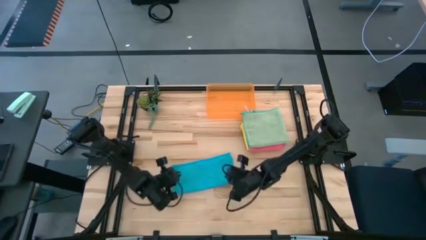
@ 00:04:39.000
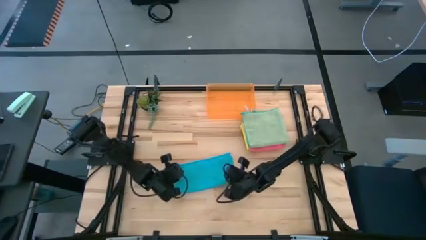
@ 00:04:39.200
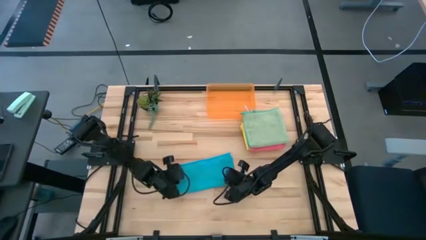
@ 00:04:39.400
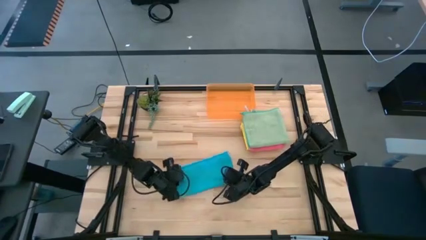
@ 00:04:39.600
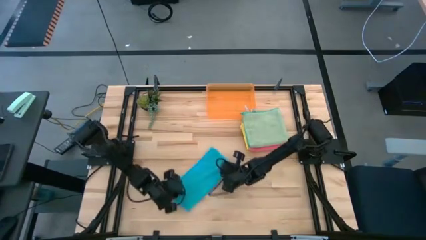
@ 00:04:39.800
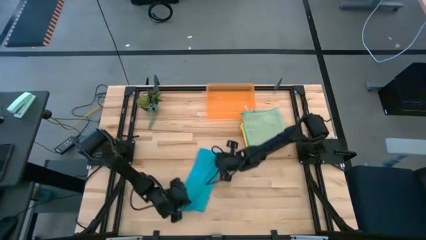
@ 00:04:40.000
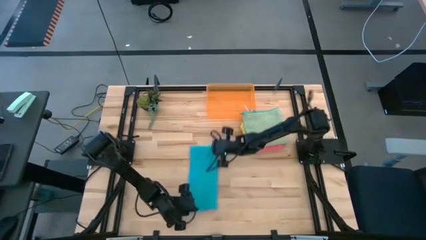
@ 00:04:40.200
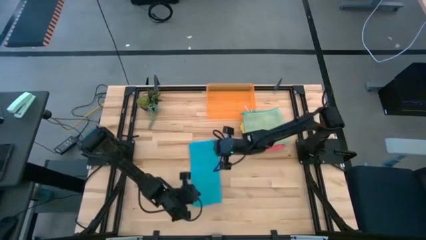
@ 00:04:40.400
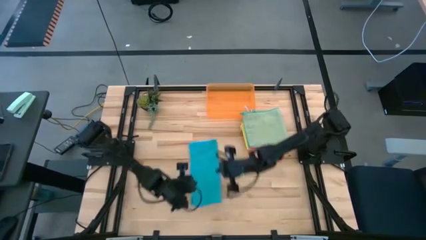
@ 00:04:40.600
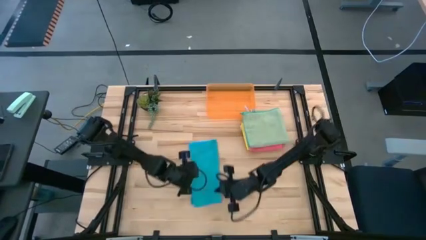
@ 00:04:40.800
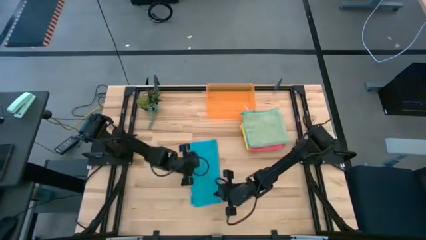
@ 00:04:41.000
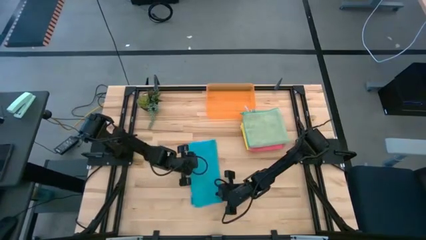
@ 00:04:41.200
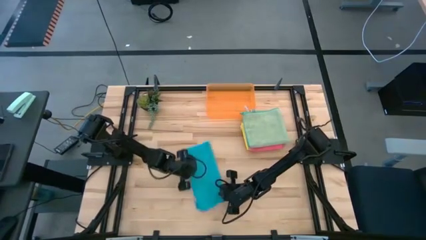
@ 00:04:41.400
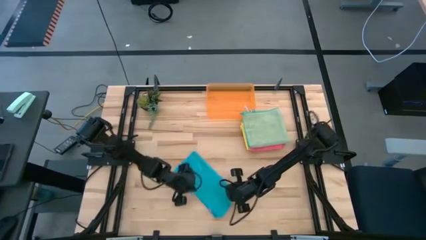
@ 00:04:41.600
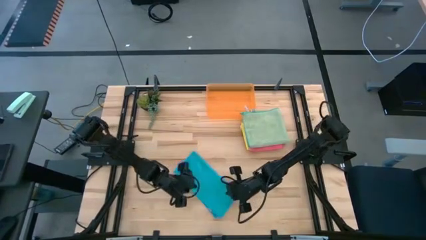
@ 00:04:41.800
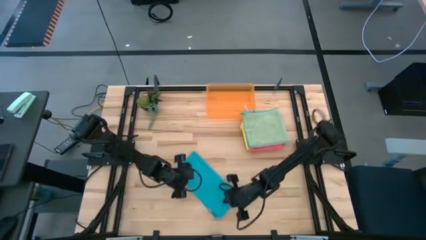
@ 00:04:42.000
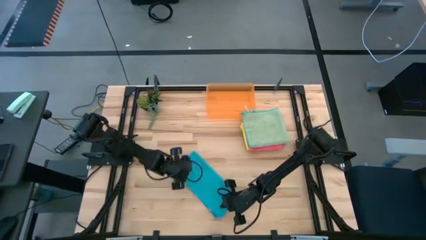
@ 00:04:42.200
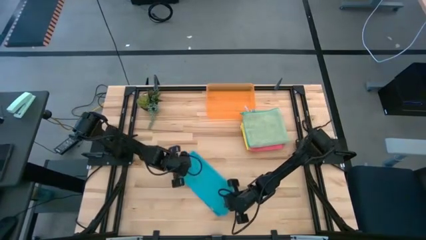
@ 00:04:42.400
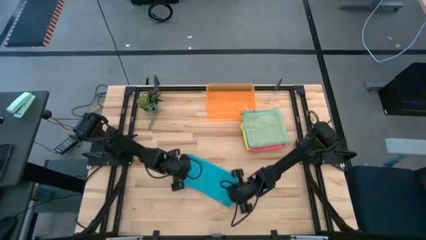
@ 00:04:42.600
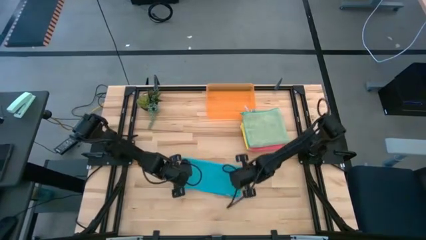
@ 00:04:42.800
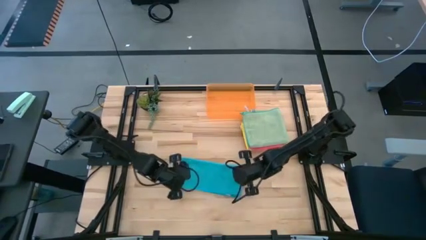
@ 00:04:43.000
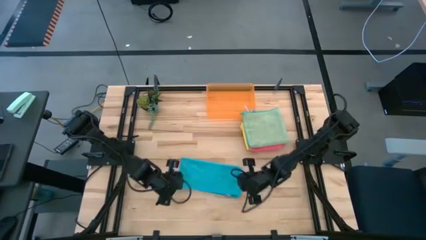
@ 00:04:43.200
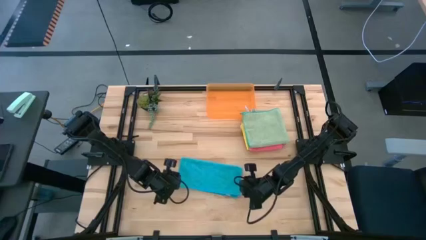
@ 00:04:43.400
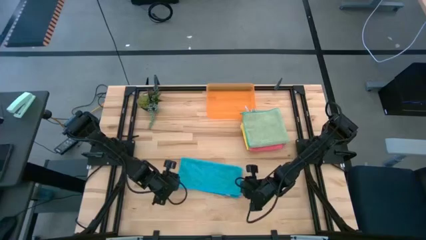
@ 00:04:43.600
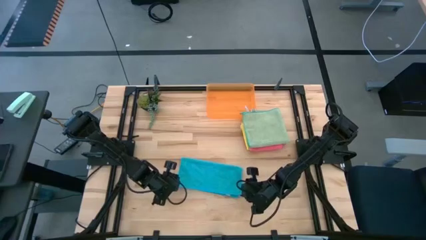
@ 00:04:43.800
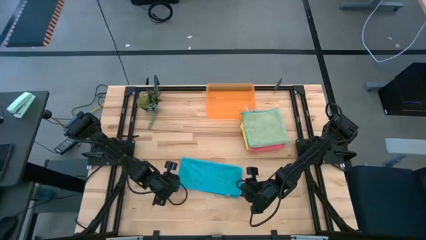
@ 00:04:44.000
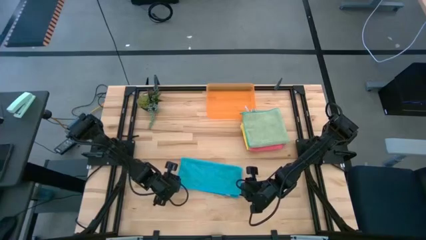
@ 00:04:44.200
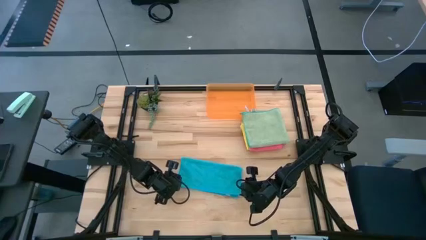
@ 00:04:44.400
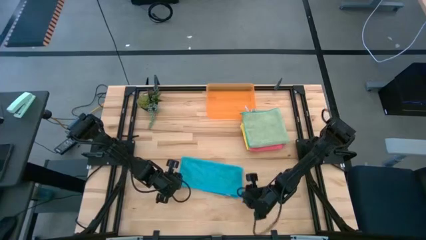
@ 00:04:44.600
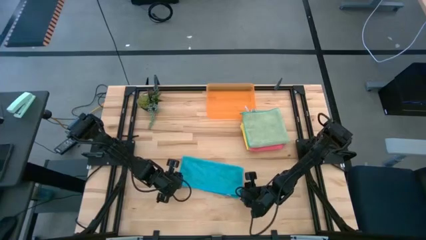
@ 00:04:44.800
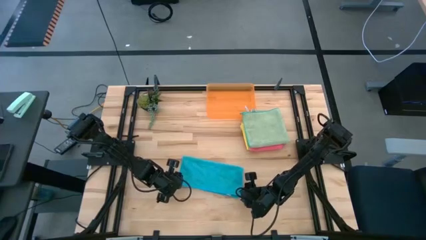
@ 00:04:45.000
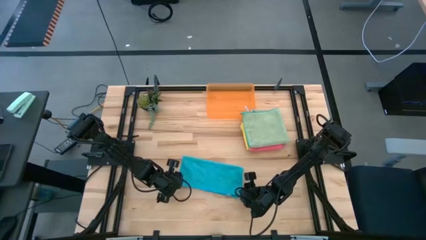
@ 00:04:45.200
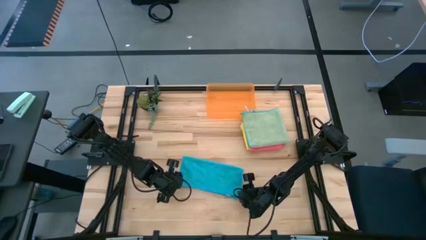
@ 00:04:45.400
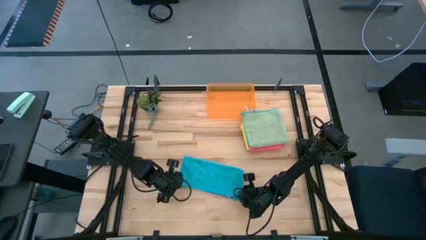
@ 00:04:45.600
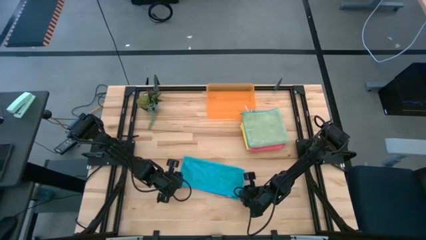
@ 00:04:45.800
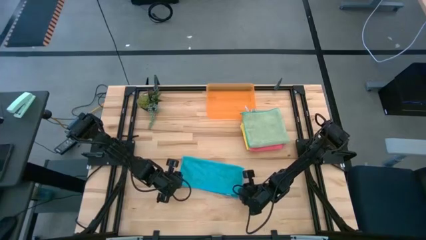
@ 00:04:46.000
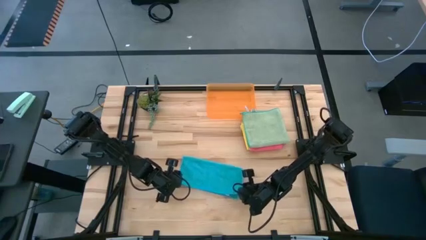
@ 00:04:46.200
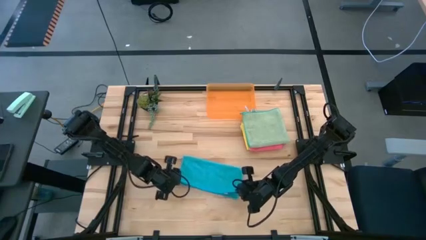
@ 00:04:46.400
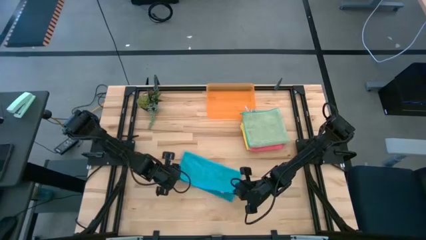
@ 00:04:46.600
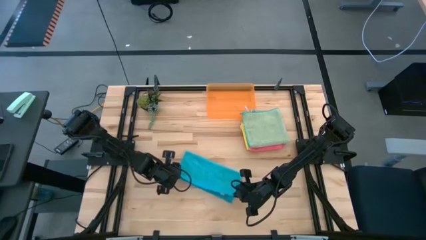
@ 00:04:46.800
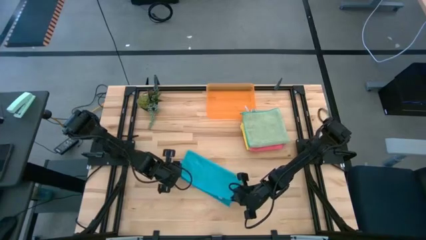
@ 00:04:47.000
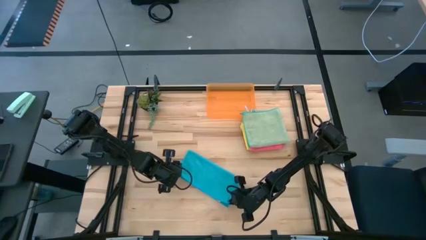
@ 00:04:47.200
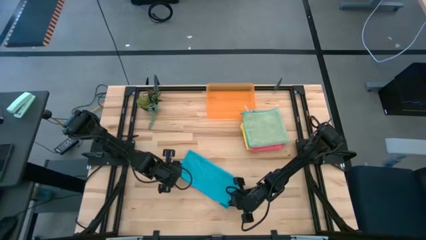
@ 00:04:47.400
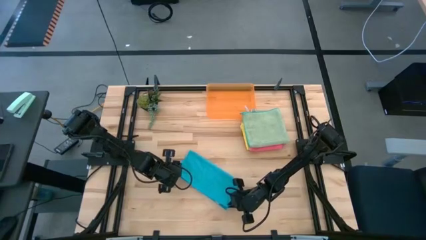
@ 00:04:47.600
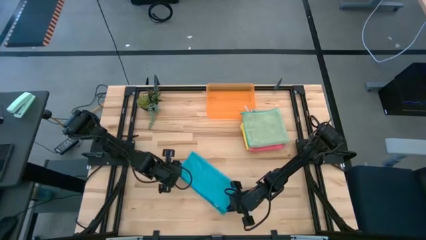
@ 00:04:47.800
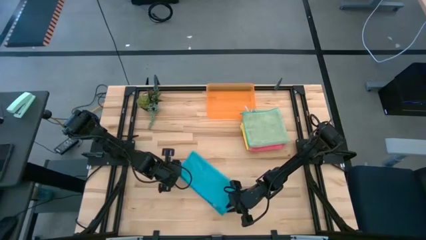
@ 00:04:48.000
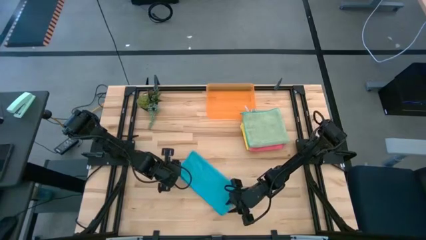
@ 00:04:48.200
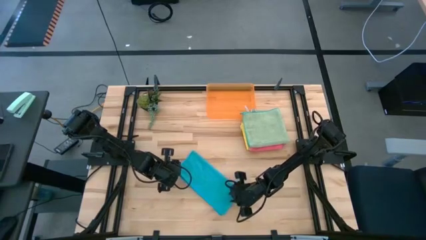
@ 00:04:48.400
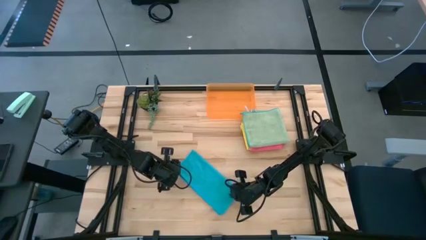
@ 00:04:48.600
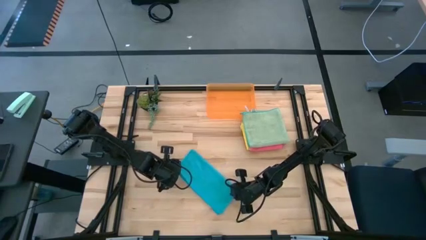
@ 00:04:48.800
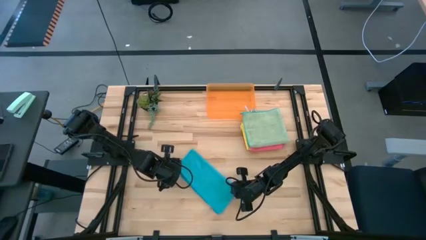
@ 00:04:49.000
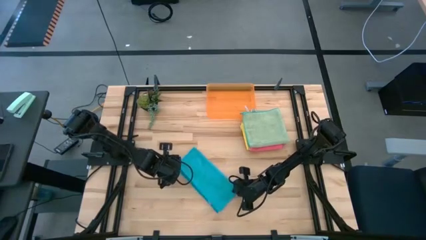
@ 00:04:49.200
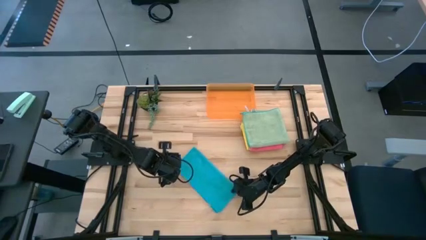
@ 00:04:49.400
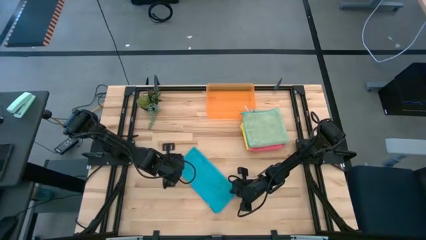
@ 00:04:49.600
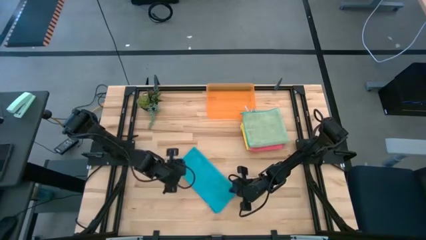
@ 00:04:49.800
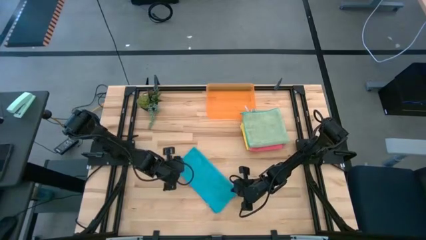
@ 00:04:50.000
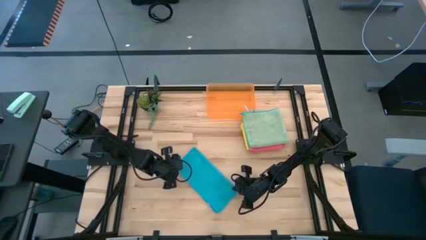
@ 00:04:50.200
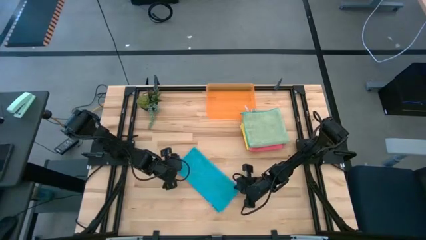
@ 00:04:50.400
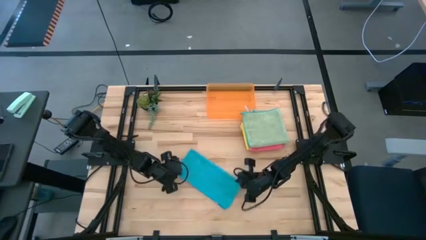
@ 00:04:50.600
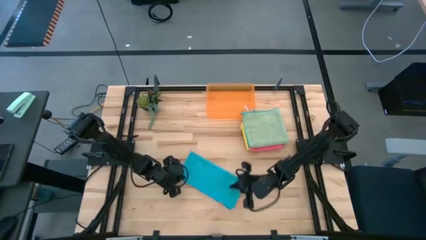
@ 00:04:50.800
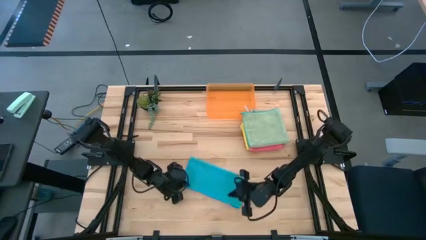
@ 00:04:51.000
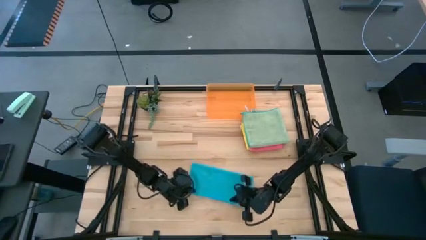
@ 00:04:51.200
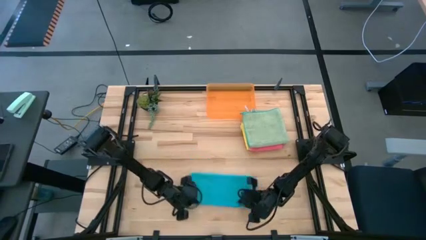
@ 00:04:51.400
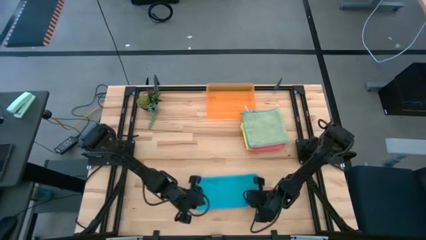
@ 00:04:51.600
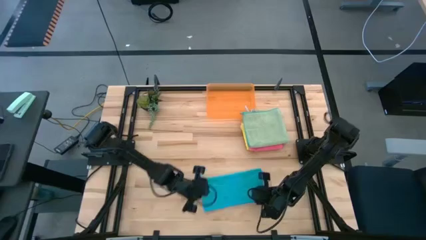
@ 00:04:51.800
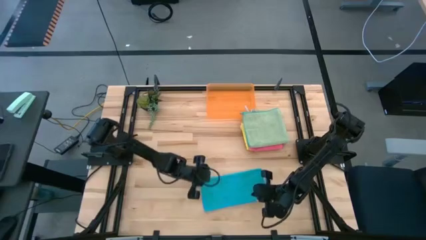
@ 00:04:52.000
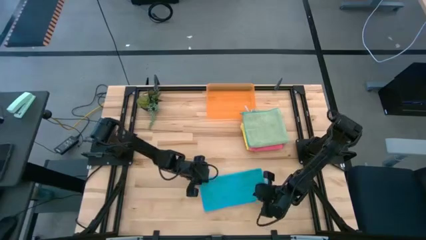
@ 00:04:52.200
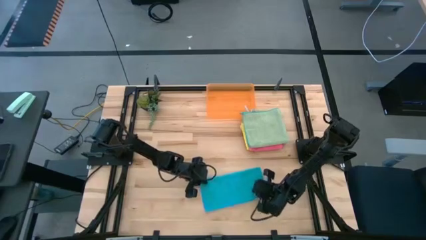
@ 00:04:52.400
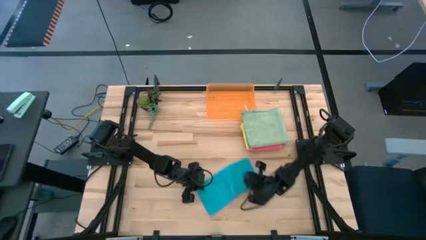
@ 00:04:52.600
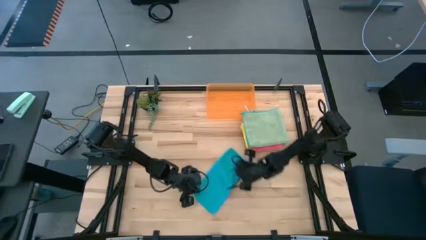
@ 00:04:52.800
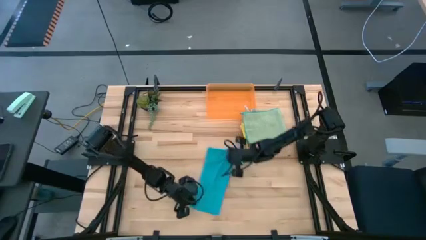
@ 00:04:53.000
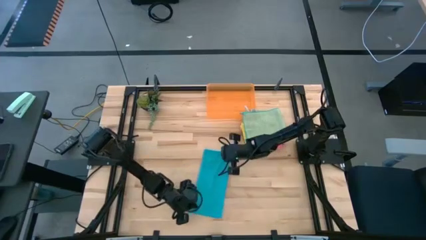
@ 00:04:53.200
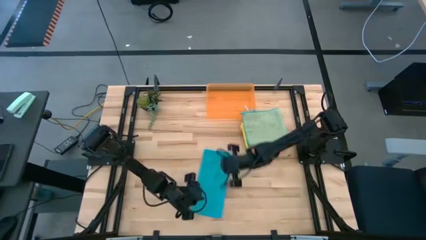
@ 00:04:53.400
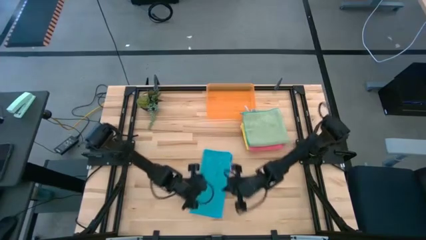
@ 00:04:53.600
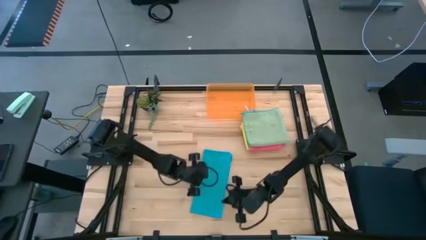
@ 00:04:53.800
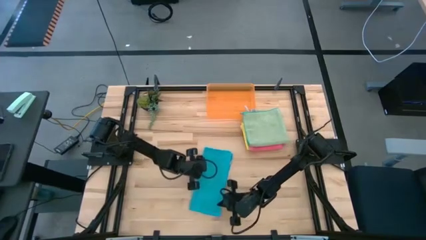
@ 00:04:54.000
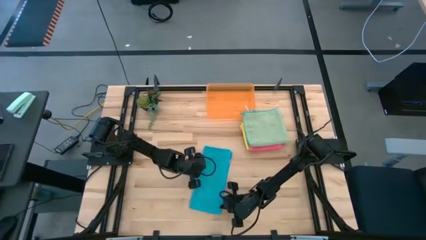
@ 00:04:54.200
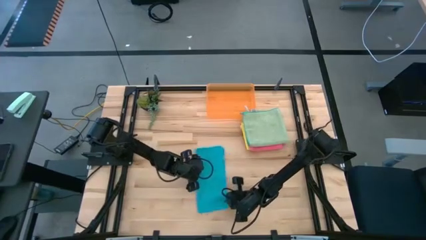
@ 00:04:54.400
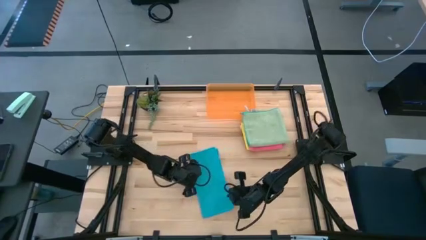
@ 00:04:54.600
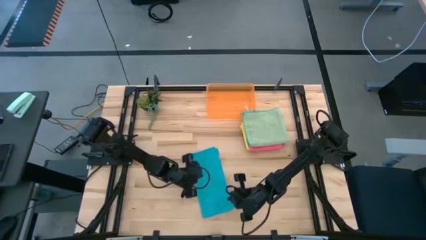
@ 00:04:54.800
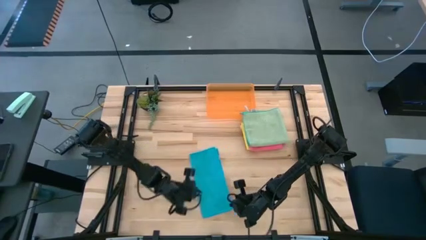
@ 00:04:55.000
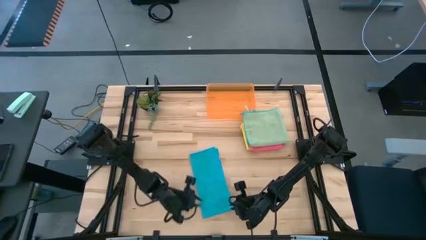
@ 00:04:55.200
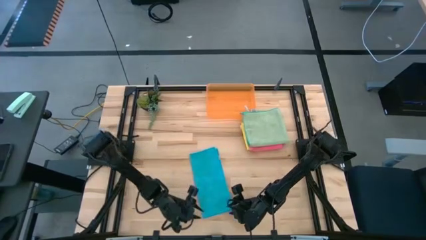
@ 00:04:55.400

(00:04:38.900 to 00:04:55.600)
Task: Fold microfiber towels
Fold the blue microfiber cloth
